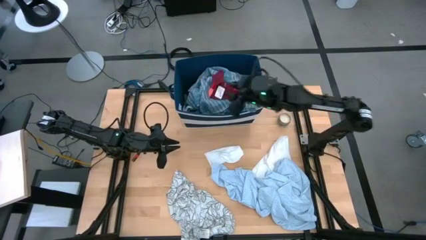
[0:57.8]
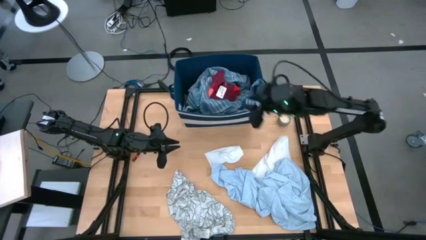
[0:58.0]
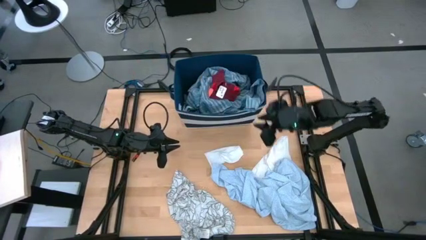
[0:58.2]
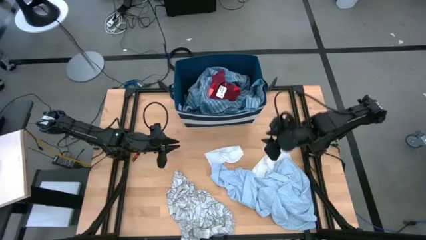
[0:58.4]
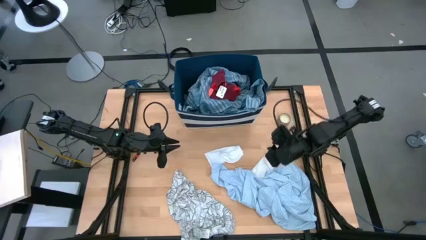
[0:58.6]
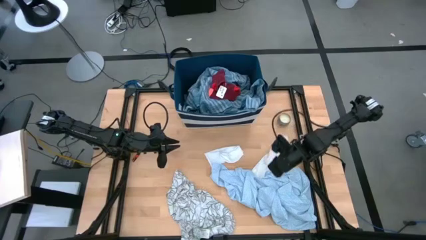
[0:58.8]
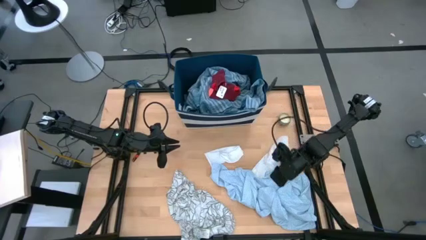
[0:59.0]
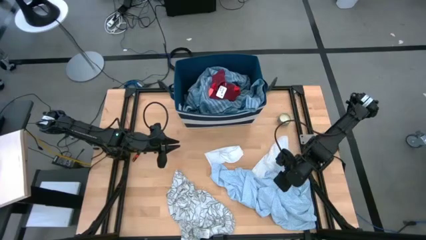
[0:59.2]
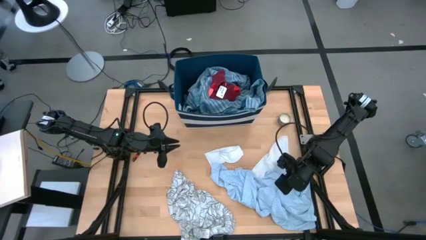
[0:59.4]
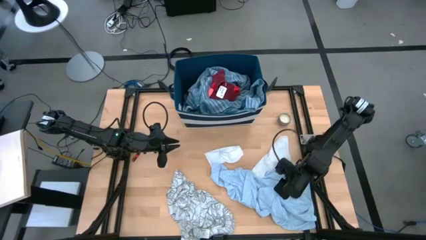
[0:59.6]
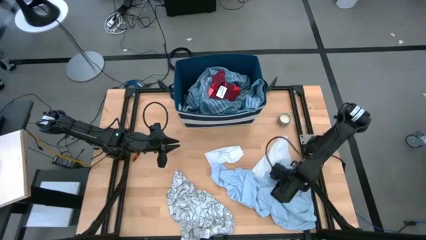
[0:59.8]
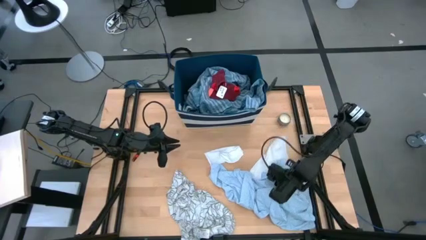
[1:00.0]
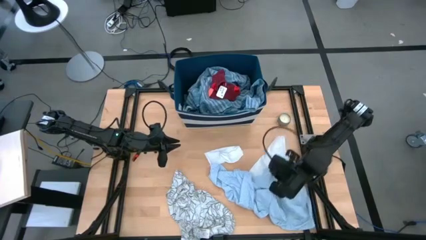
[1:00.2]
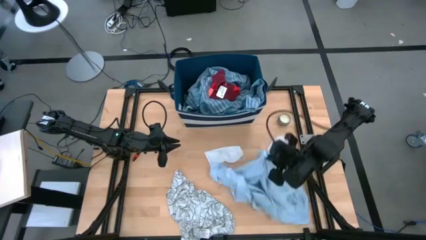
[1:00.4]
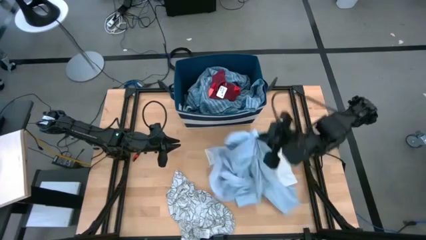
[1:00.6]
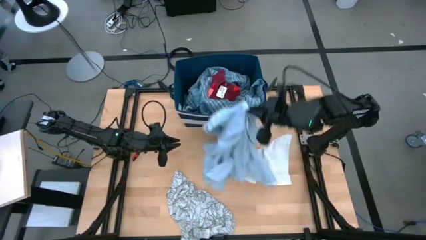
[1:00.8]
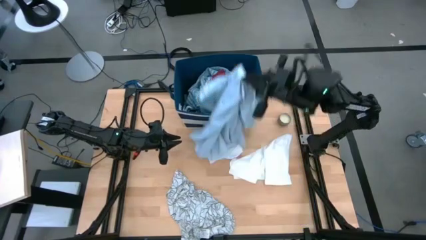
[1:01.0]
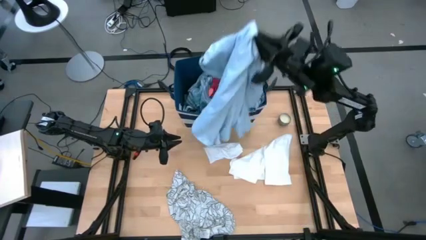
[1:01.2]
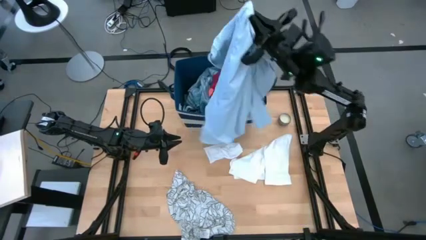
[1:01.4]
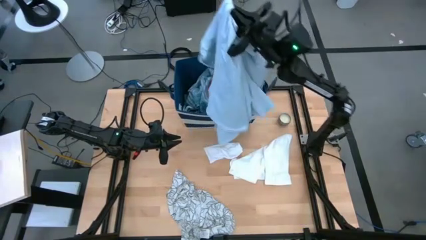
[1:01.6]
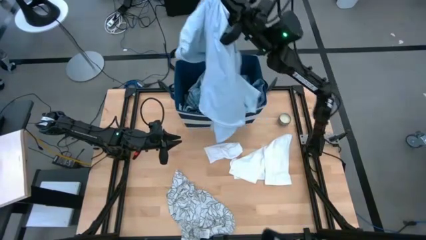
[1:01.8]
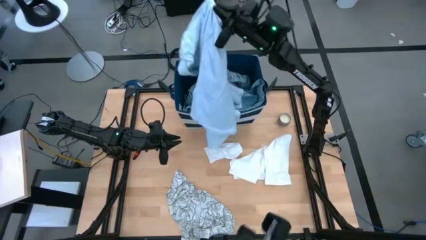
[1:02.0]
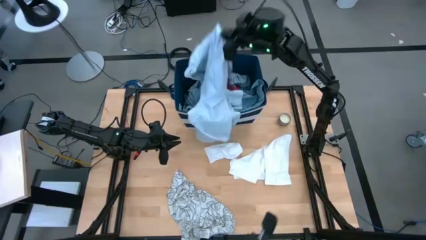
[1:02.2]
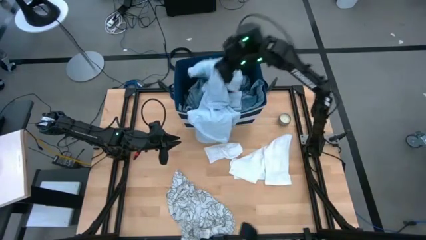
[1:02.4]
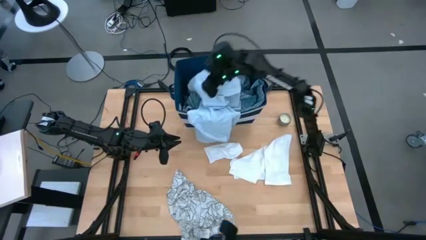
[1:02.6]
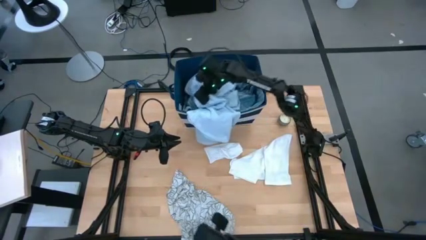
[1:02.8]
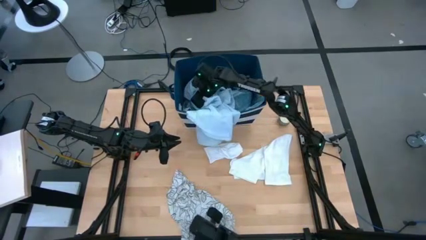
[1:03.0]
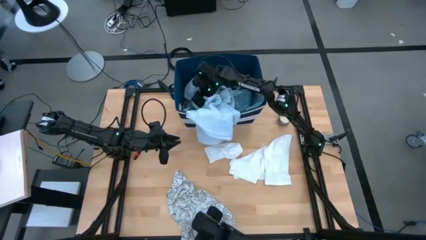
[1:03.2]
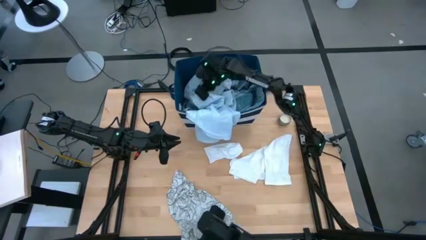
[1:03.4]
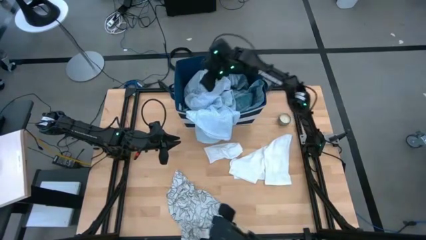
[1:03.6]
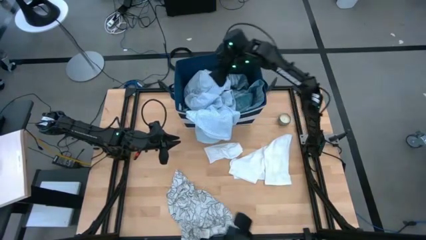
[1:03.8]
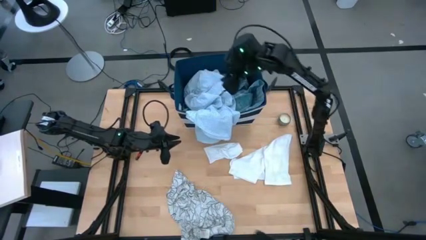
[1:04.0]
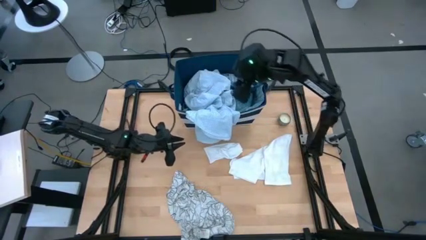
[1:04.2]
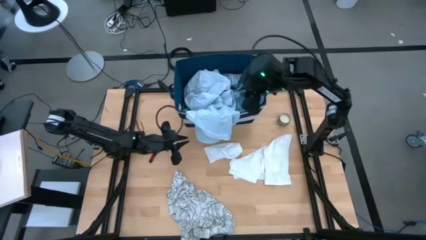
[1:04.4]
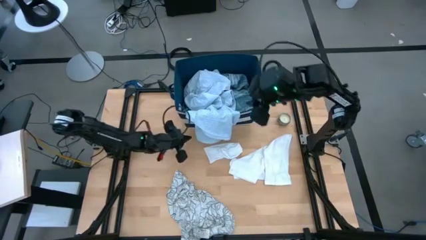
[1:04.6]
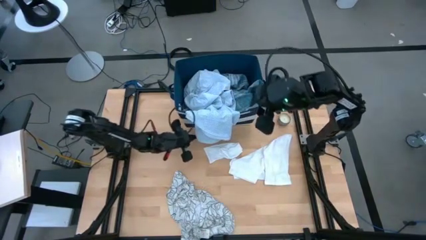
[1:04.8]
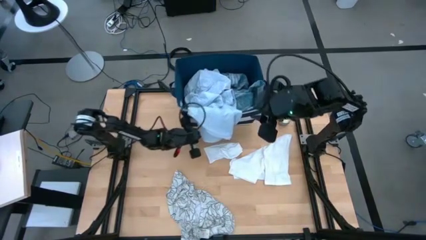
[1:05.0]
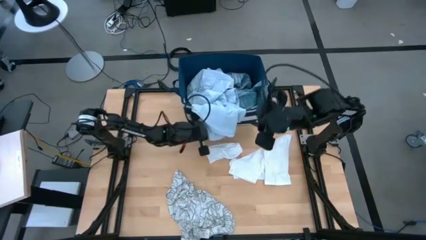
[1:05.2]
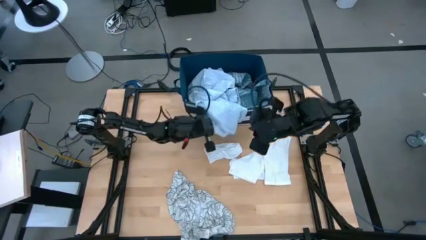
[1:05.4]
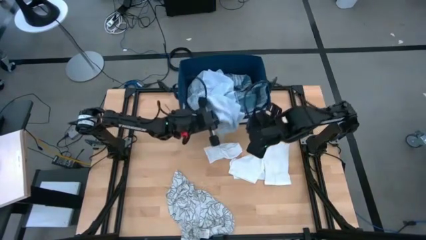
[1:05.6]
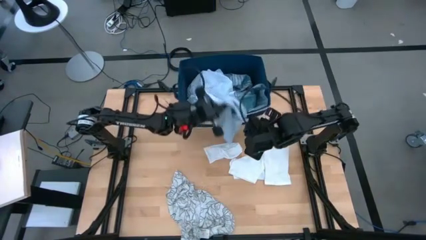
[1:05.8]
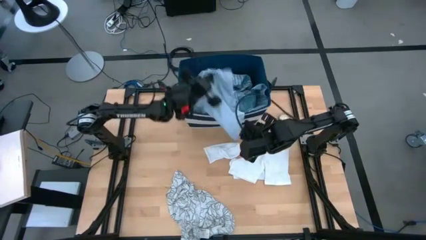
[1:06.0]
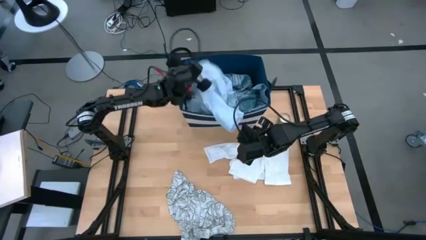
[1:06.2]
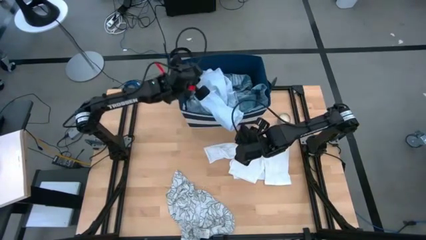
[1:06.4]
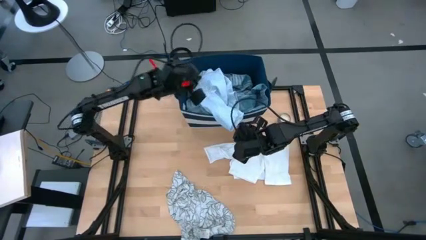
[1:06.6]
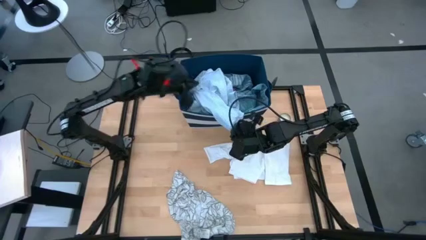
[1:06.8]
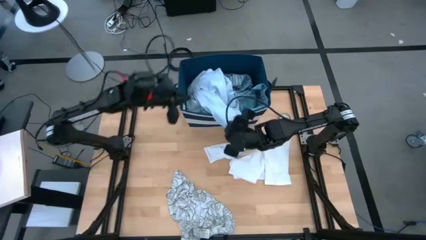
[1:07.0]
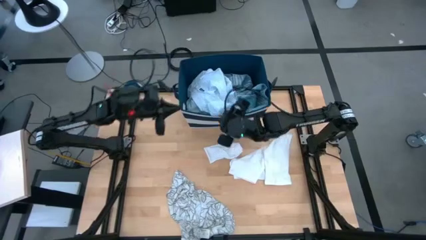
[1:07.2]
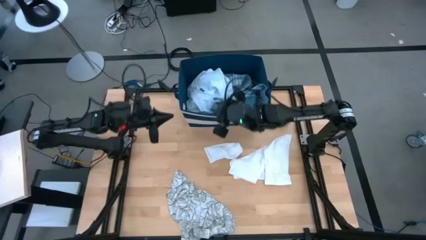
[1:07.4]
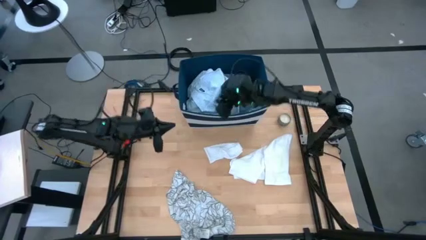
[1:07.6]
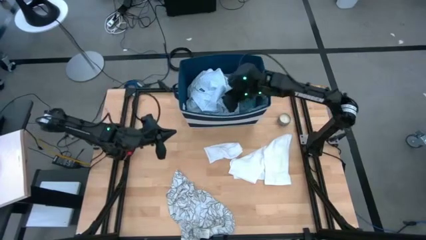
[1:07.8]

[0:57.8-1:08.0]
Task: Sort clothes
Put the light blue shirt into the blue bin

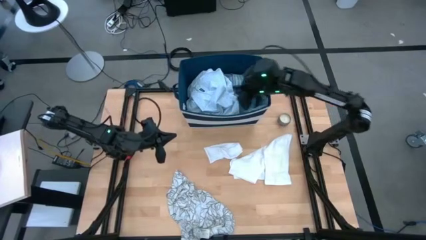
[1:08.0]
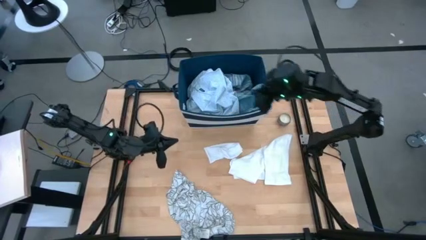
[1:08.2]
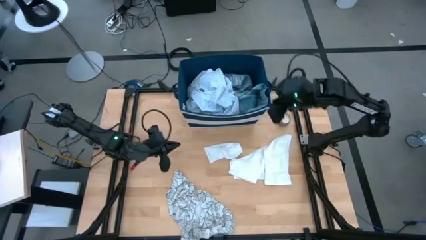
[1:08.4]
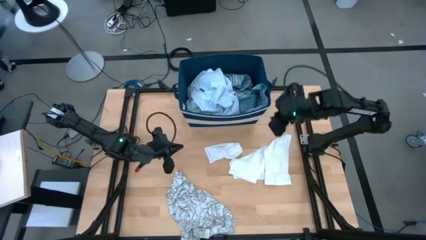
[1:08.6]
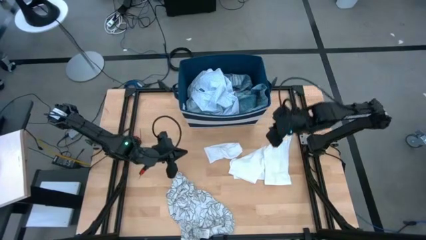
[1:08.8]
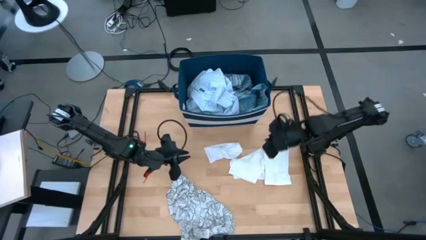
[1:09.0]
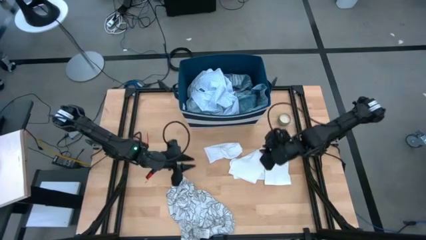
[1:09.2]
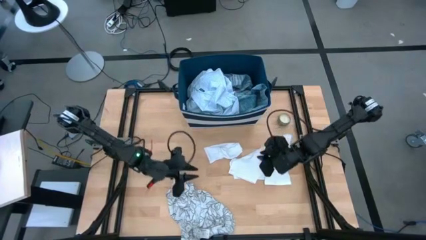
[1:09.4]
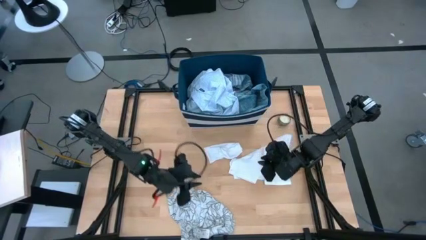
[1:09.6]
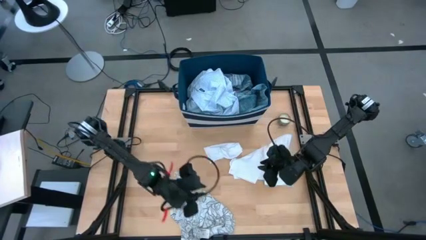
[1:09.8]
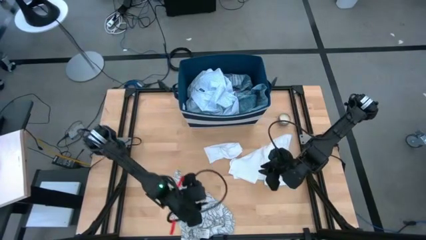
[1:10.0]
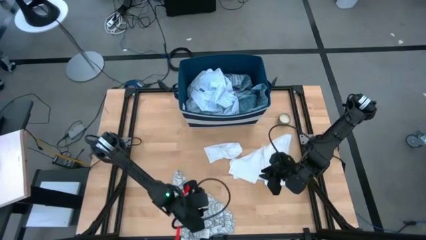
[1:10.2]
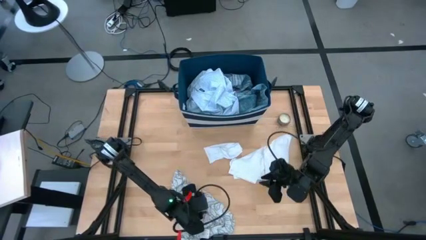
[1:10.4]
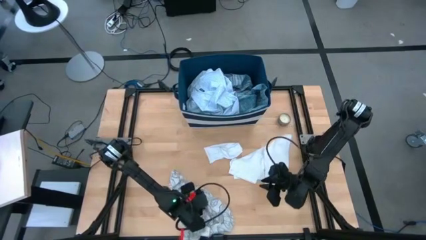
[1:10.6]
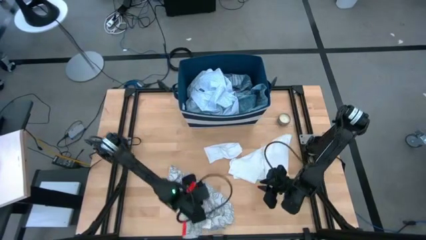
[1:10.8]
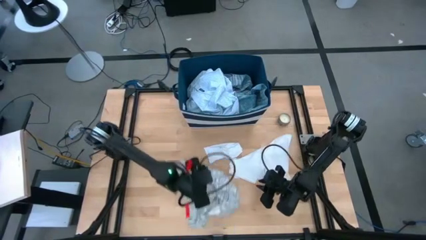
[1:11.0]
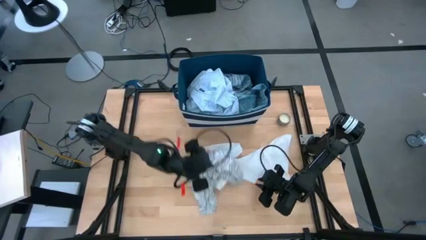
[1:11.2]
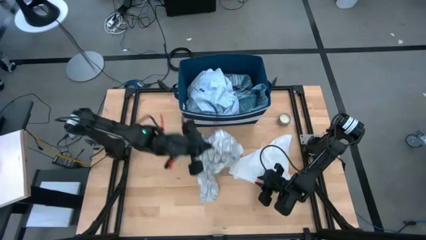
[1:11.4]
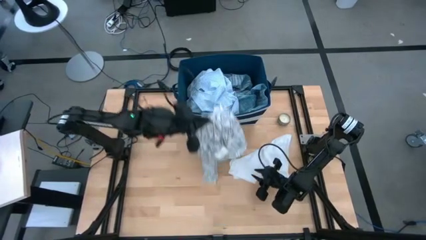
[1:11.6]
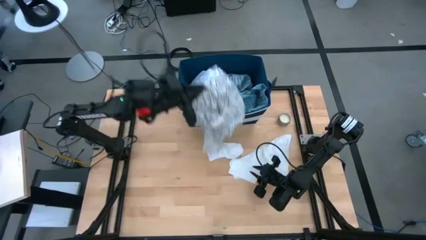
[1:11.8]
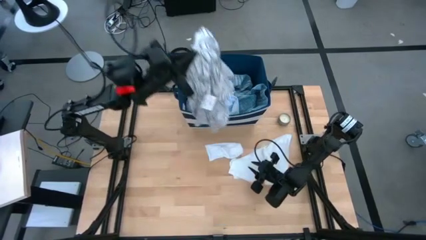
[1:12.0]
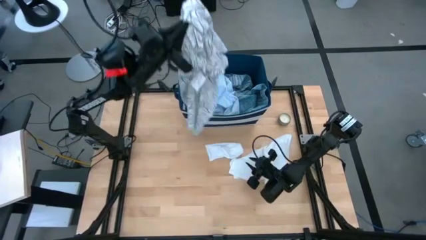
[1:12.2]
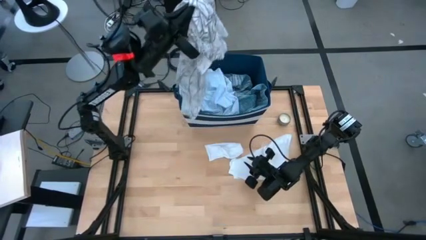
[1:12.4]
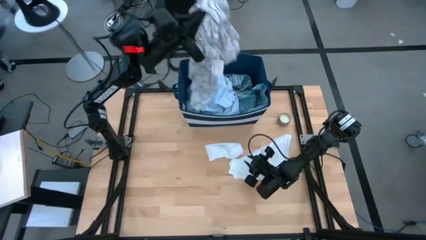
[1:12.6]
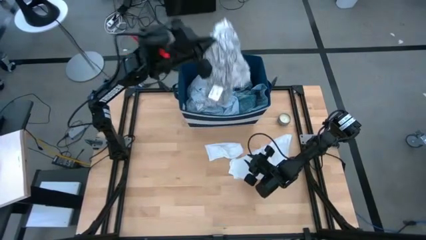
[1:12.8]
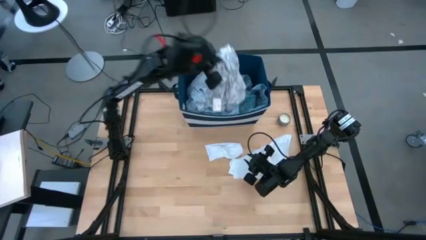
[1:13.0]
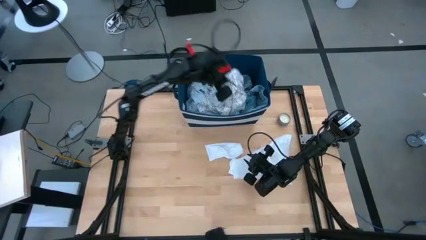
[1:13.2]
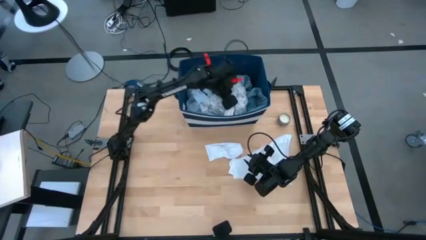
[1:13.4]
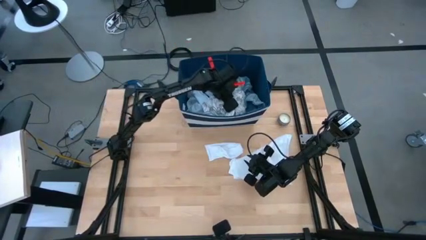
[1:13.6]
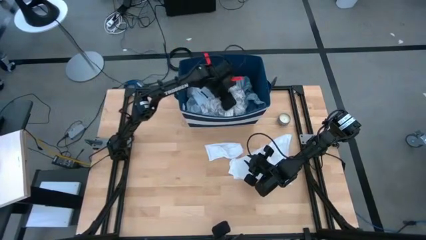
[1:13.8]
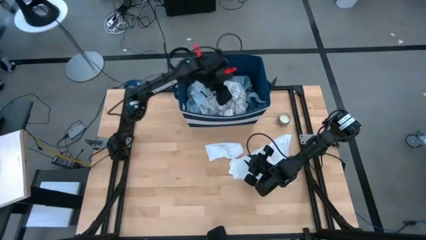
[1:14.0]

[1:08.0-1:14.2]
Put the patterned white polo shirt into the blue bin
